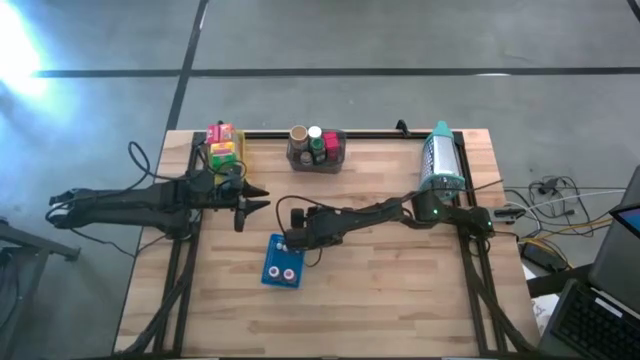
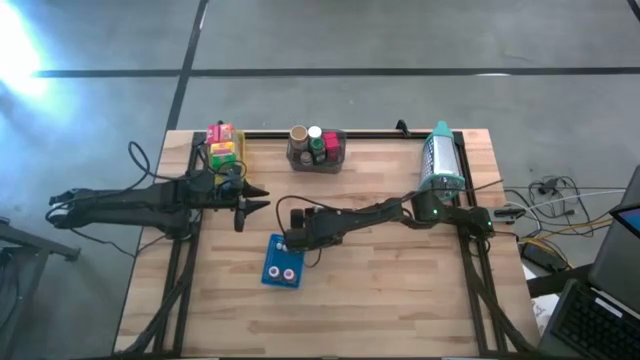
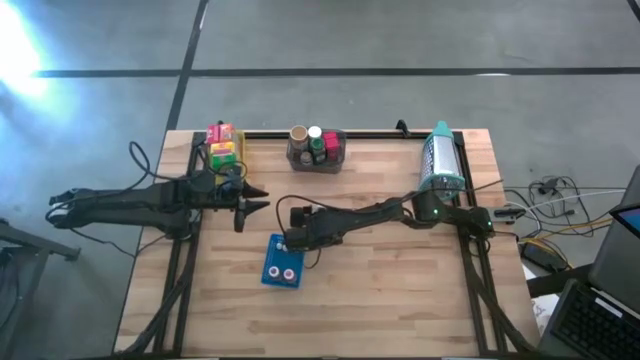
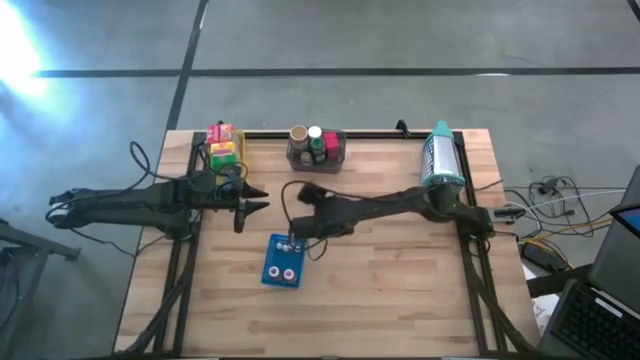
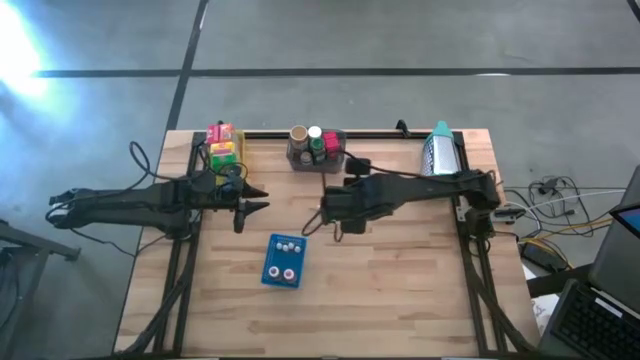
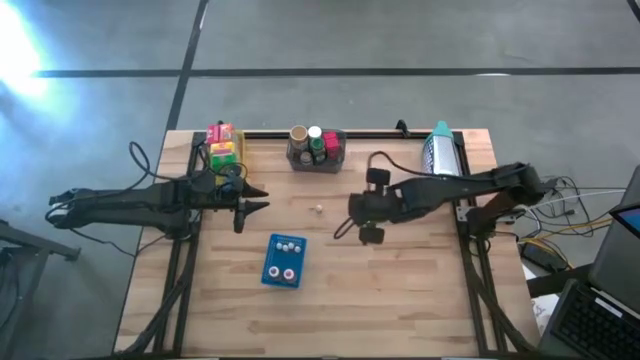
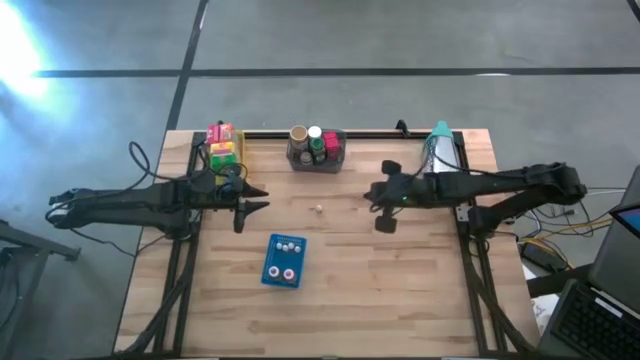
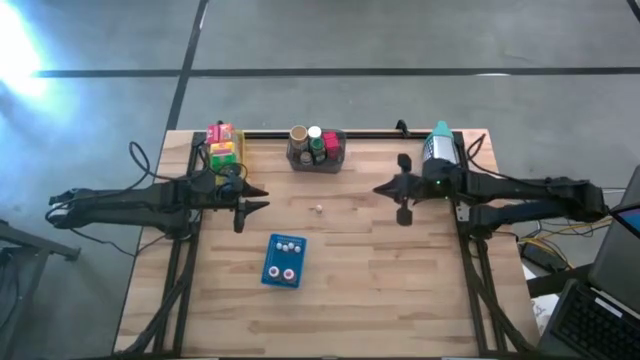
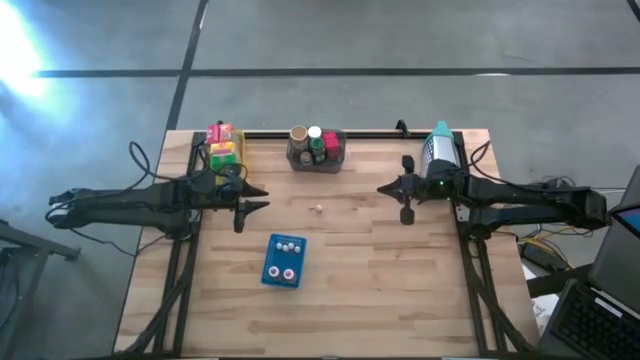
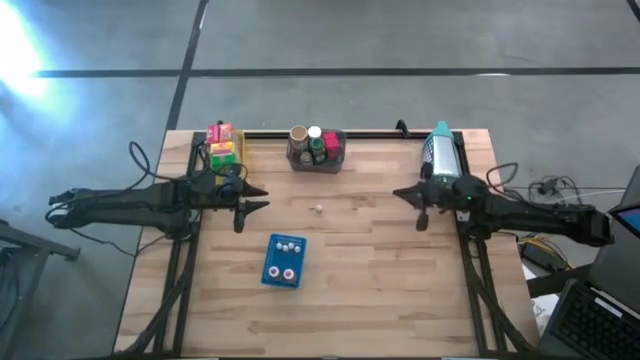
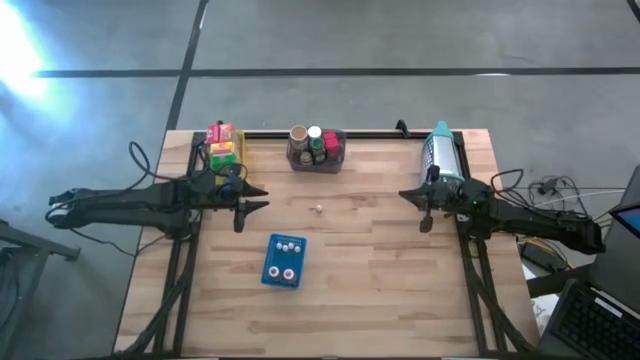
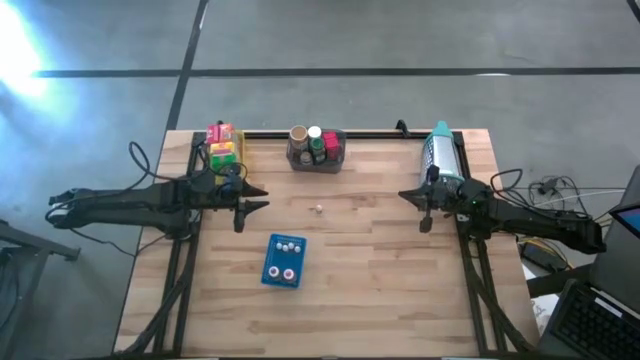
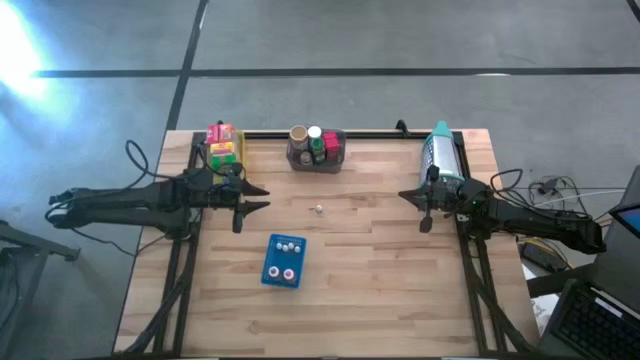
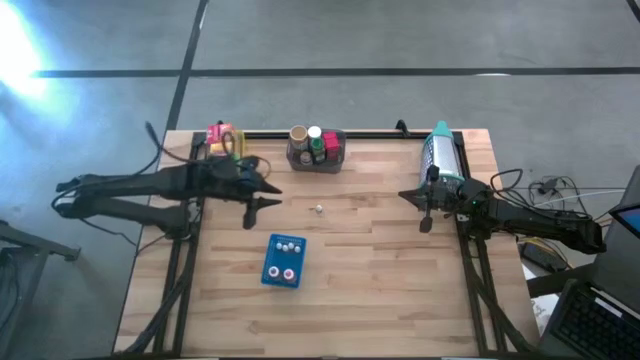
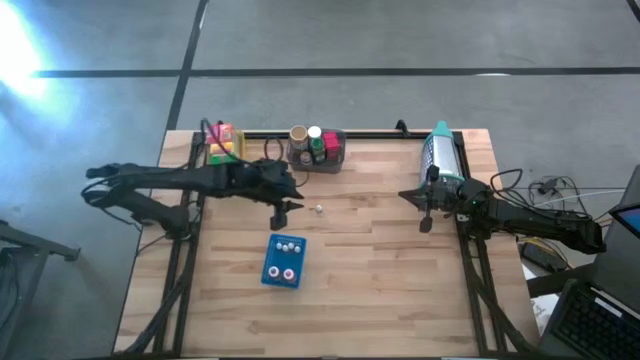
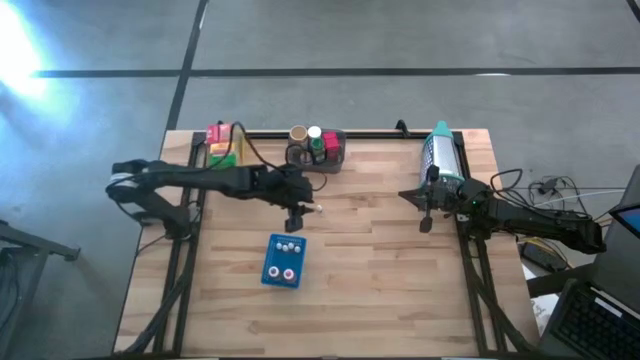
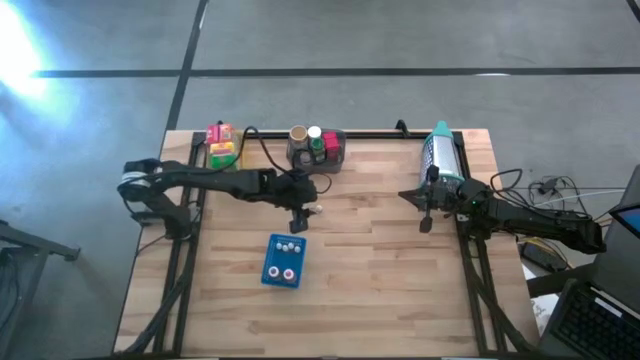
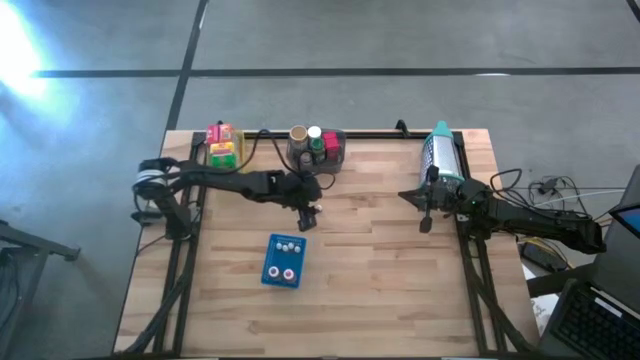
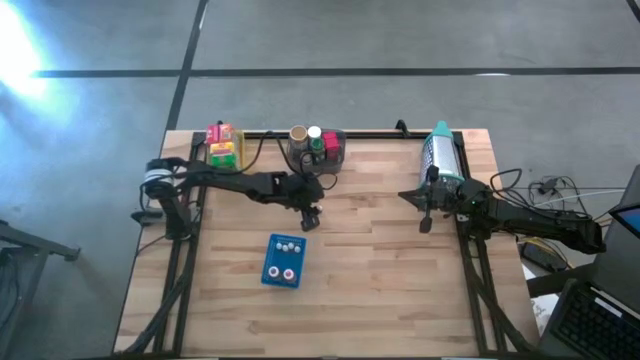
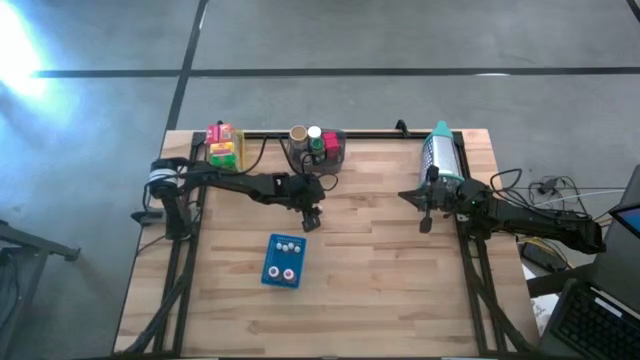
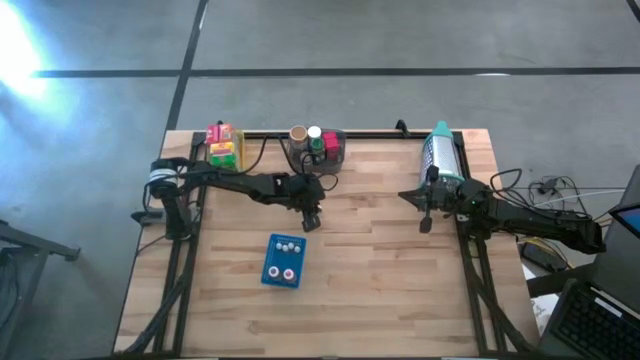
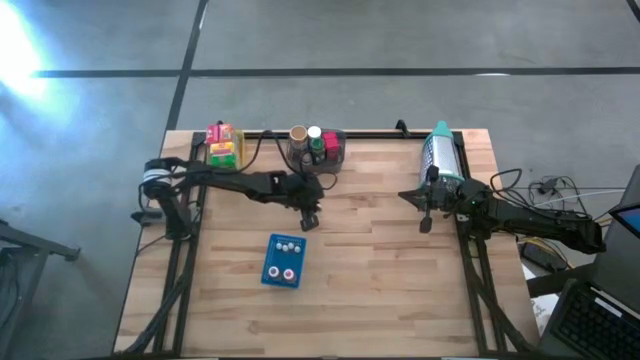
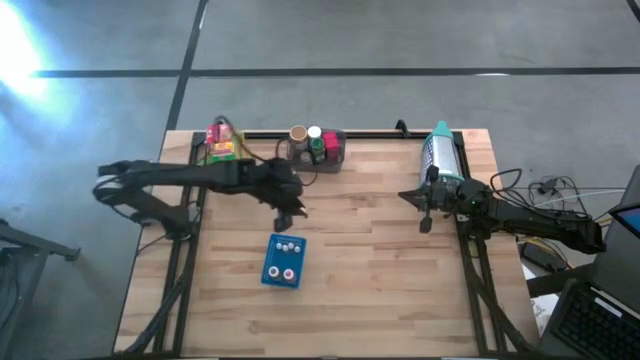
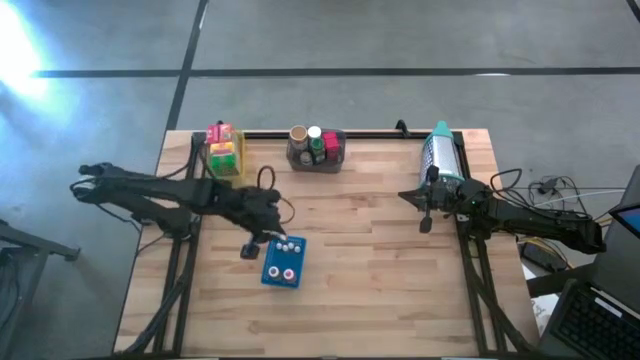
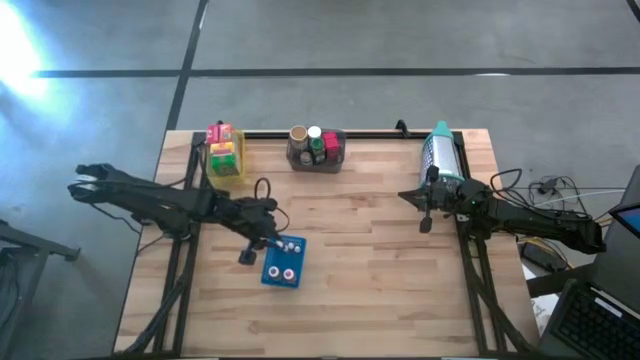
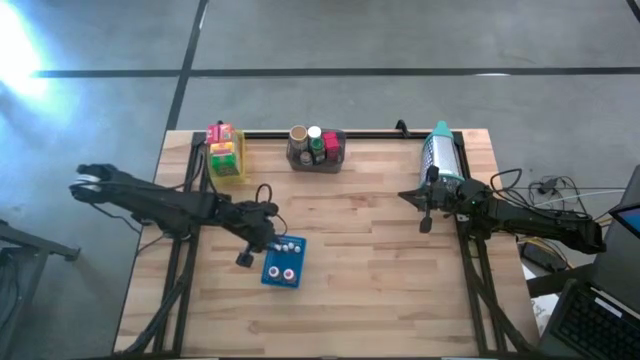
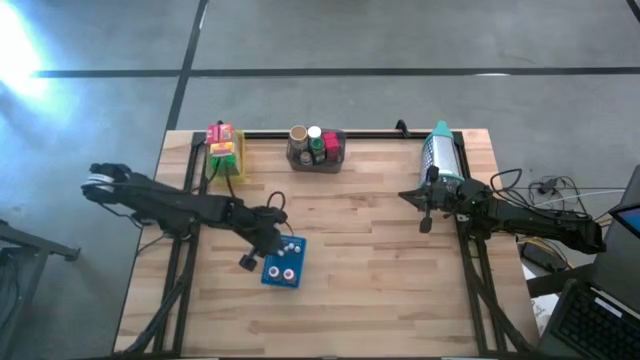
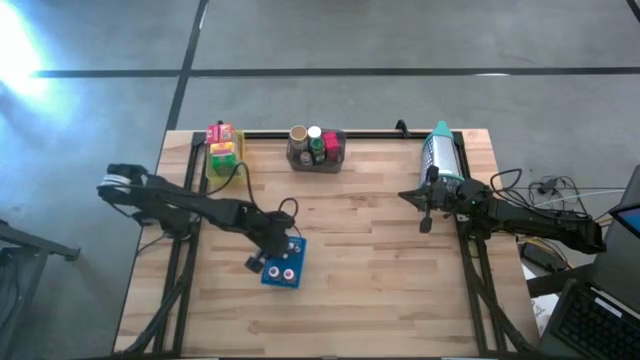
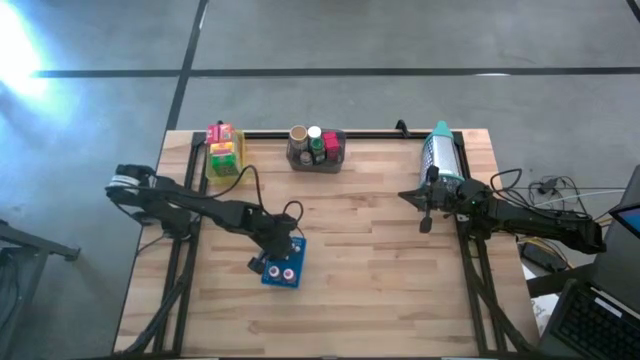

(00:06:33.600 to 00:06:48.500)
Task: Pick & Place Kitchen Items
Put the red food coloring bottle into the blue bin

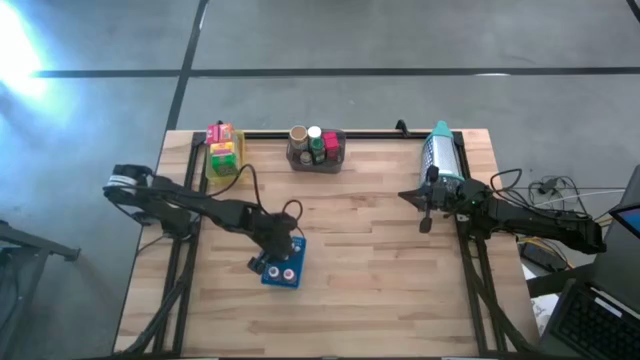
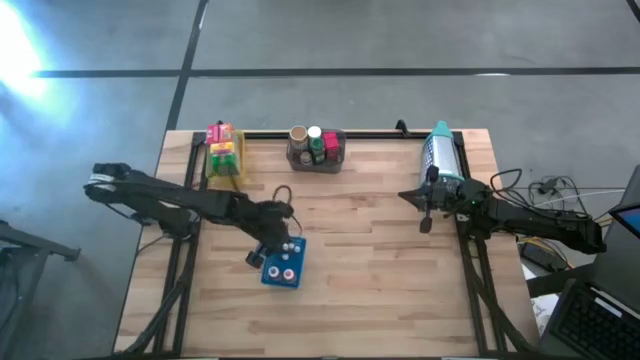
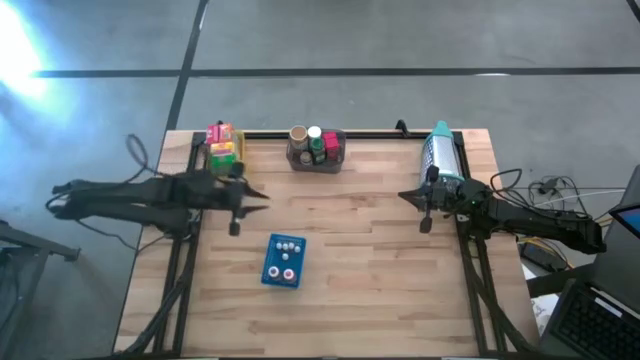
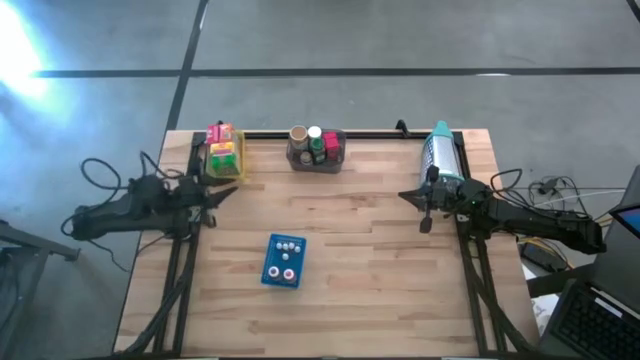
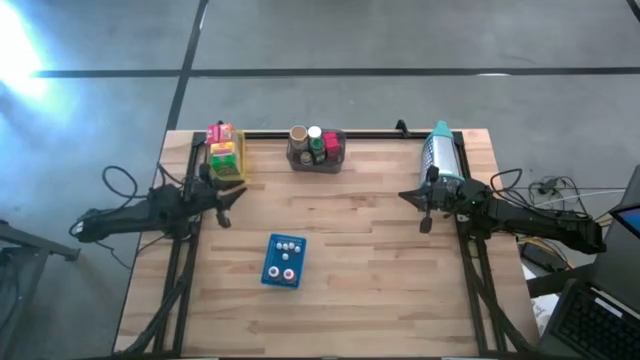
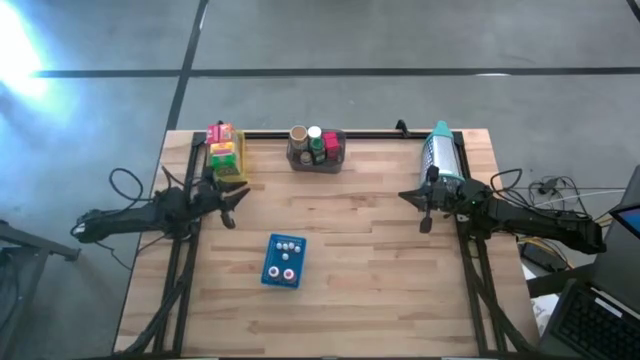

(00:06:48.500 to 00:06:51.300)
Return to Home position

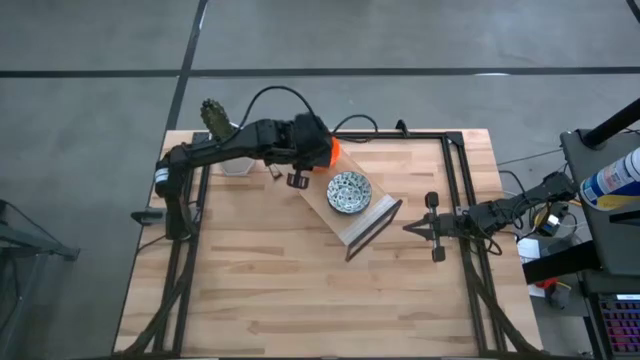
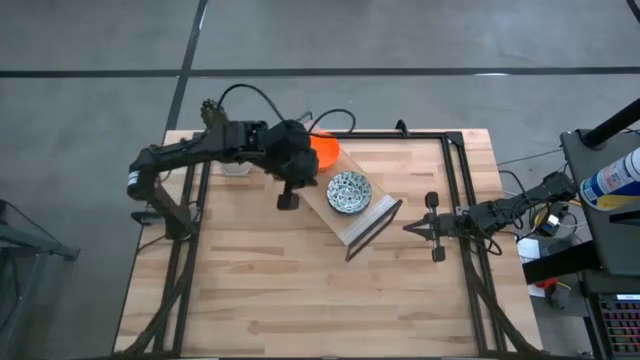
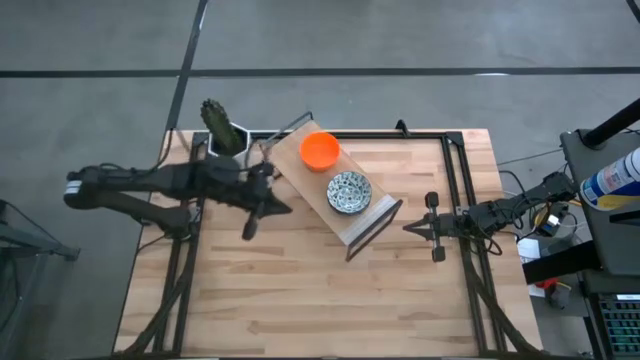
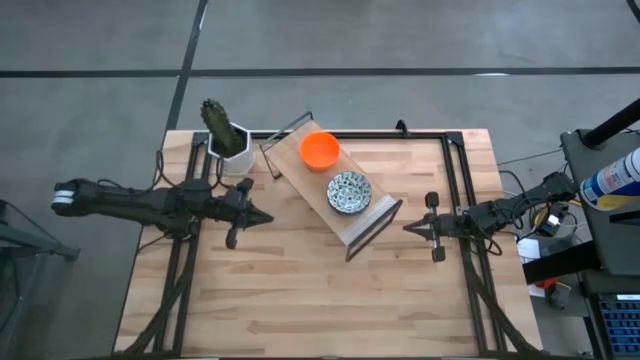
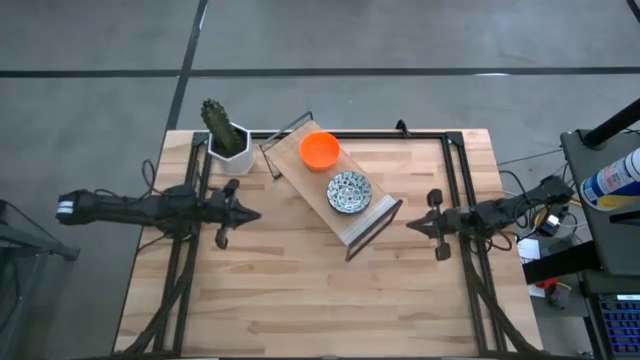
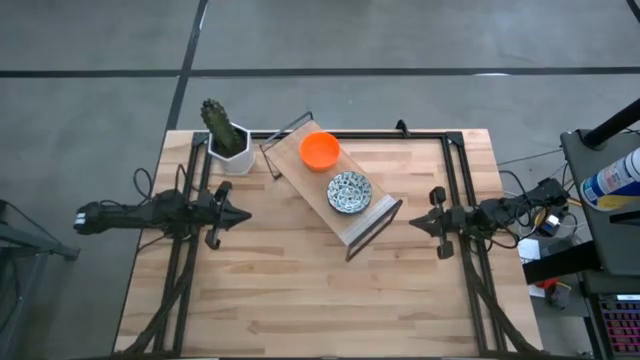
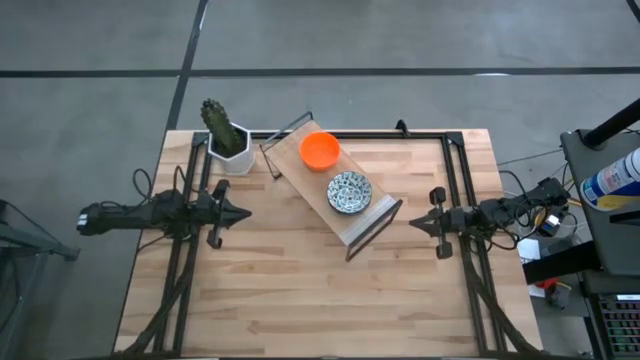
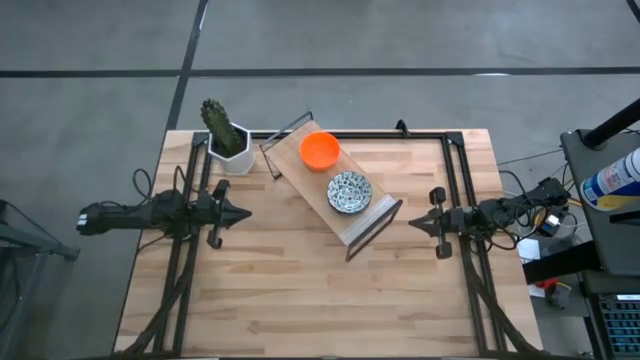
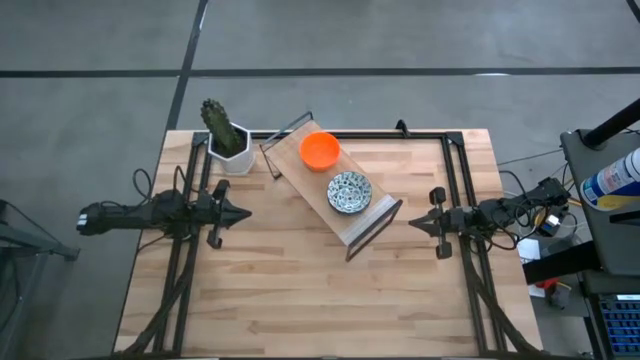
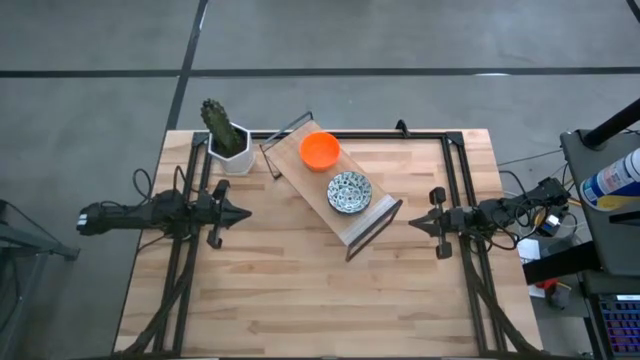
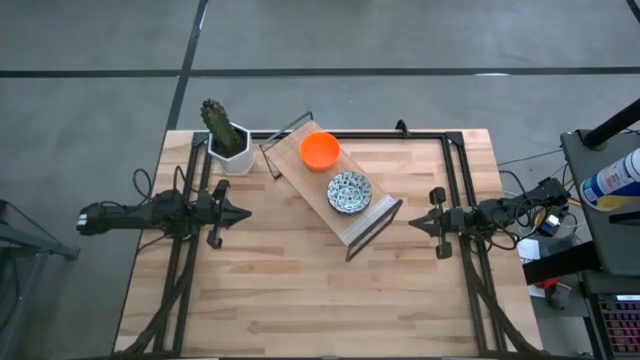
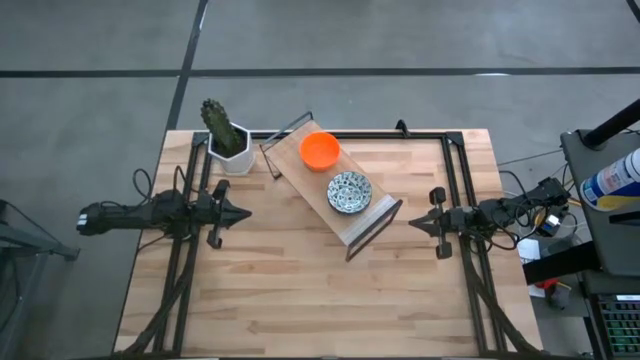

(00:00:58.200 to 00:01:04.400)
Task: Pick & Place Mini bowls
Return to Home Position
